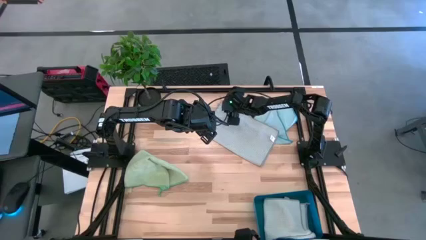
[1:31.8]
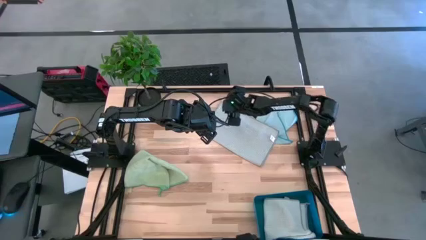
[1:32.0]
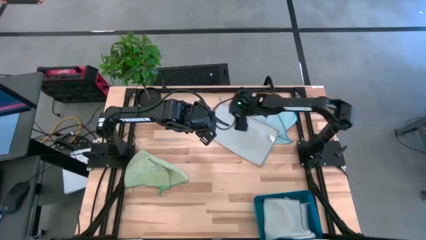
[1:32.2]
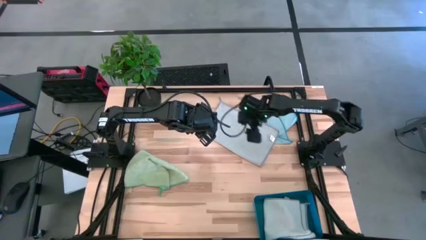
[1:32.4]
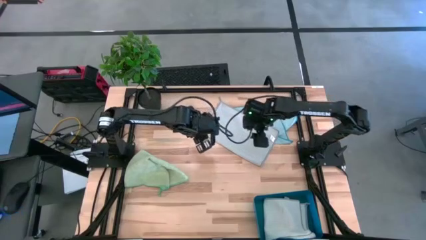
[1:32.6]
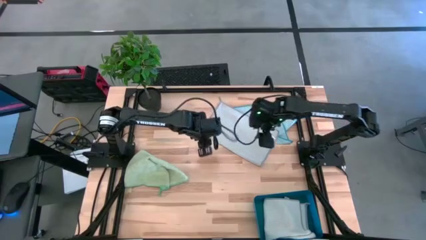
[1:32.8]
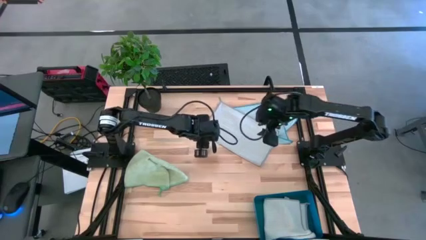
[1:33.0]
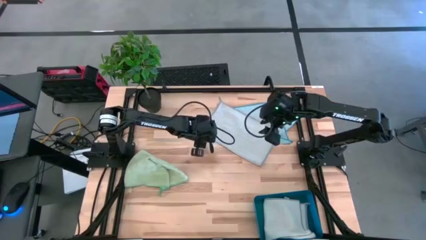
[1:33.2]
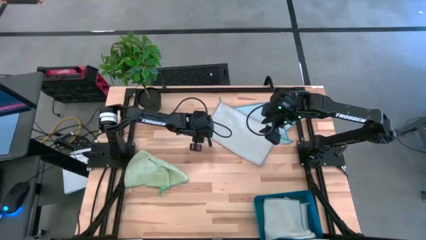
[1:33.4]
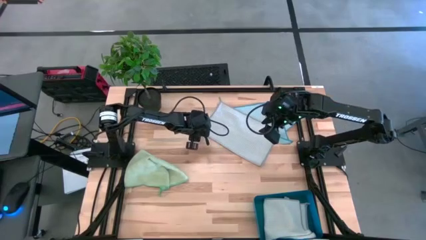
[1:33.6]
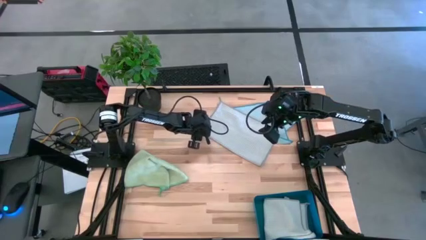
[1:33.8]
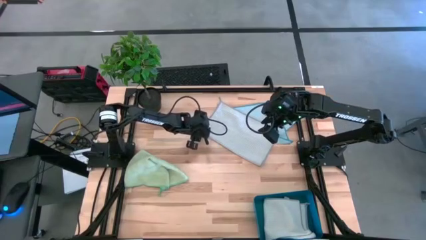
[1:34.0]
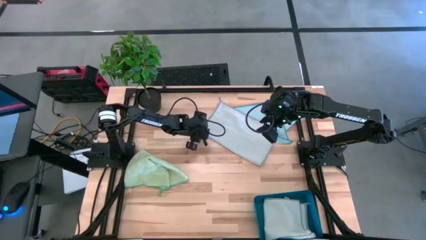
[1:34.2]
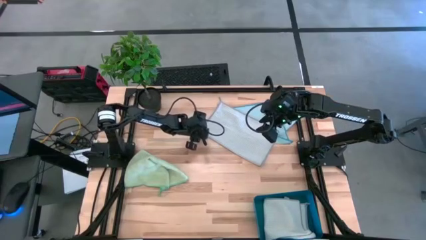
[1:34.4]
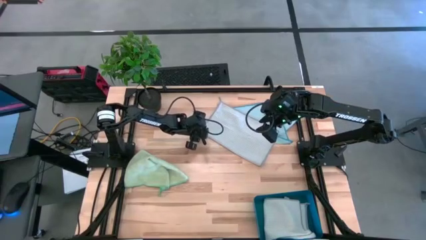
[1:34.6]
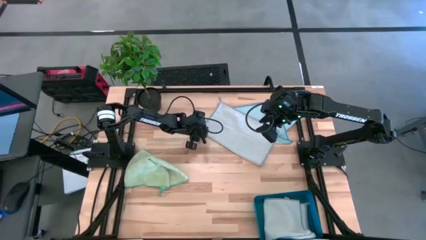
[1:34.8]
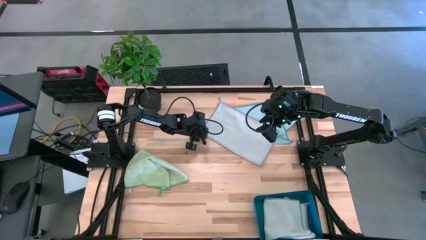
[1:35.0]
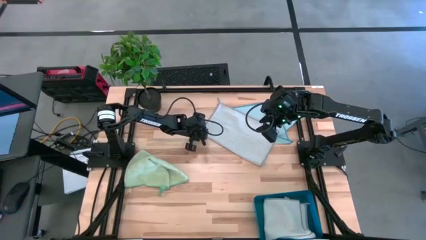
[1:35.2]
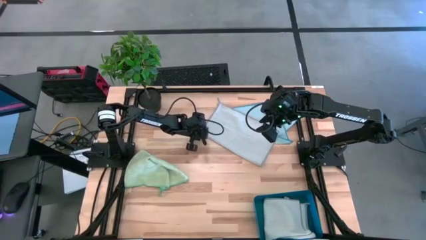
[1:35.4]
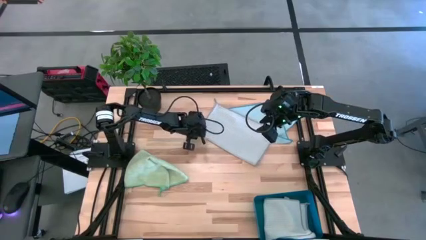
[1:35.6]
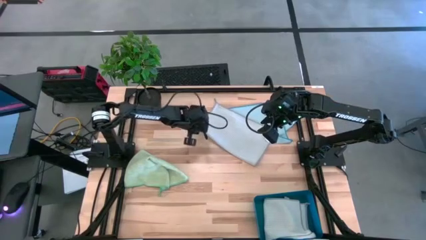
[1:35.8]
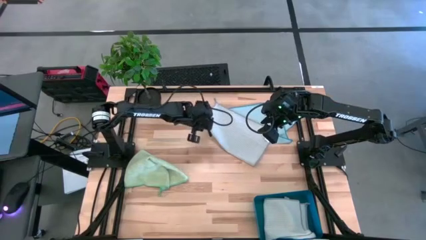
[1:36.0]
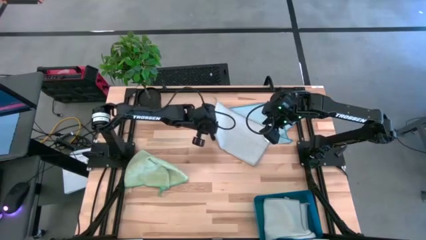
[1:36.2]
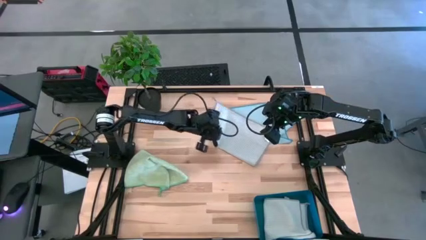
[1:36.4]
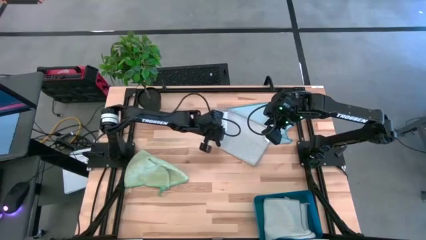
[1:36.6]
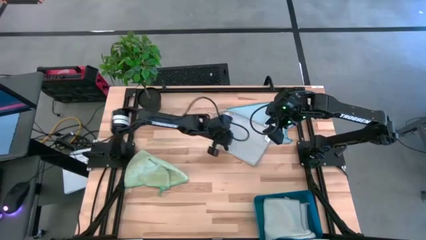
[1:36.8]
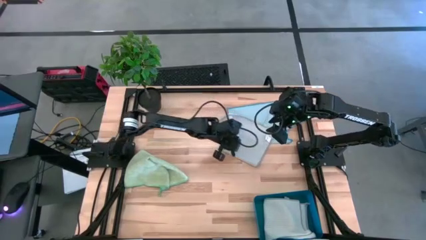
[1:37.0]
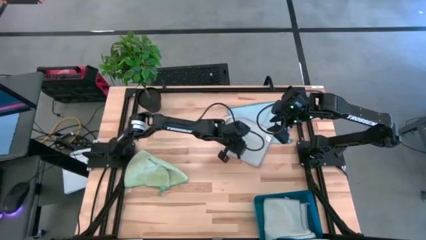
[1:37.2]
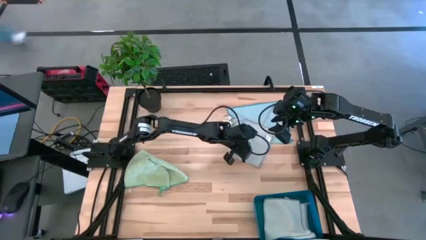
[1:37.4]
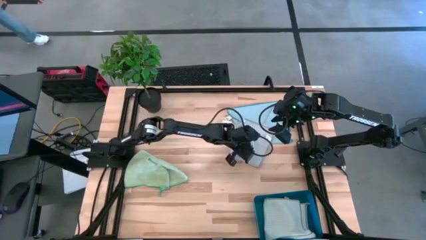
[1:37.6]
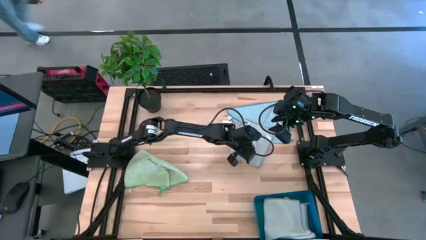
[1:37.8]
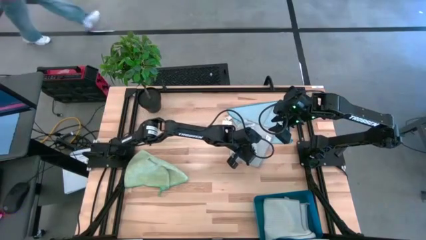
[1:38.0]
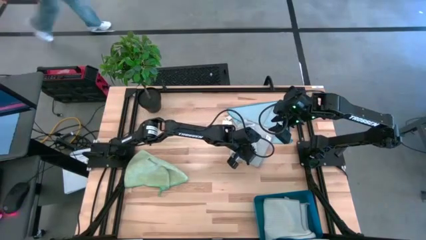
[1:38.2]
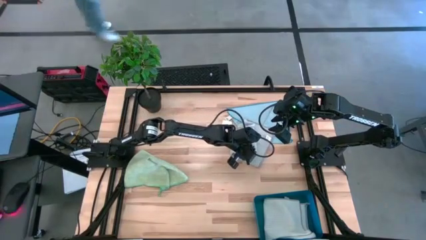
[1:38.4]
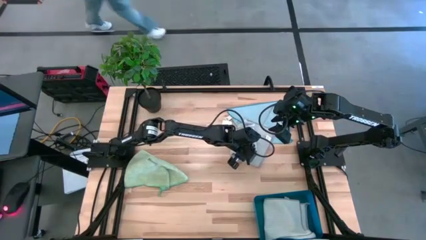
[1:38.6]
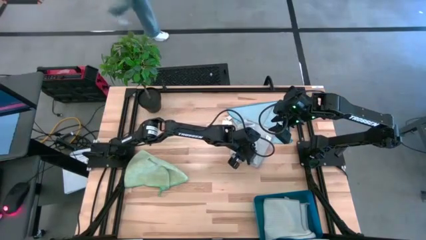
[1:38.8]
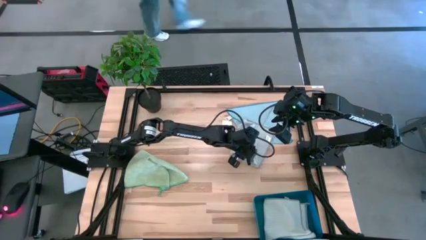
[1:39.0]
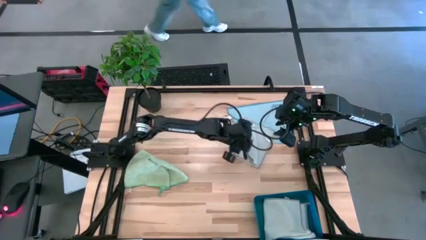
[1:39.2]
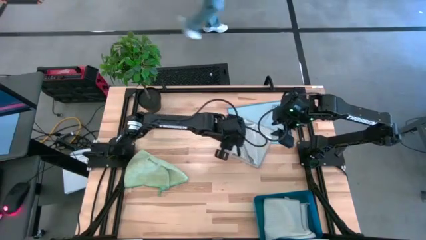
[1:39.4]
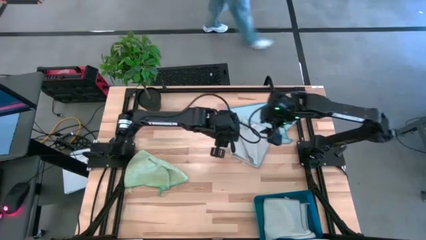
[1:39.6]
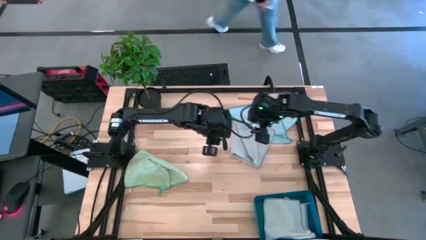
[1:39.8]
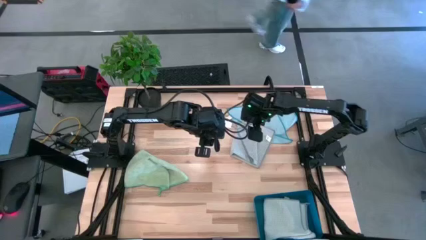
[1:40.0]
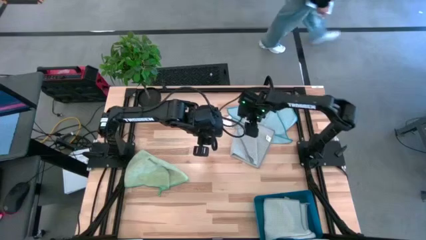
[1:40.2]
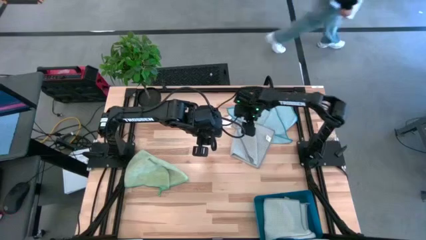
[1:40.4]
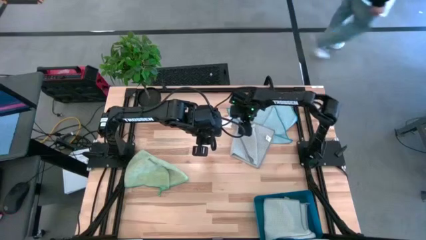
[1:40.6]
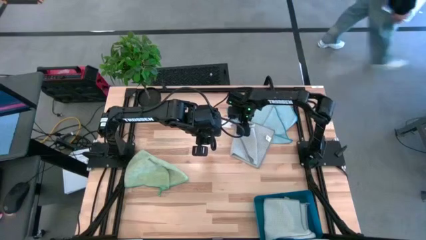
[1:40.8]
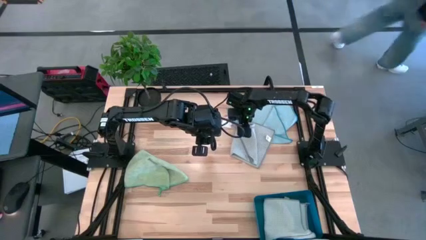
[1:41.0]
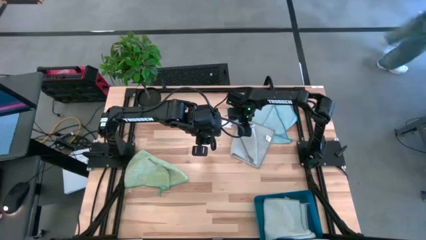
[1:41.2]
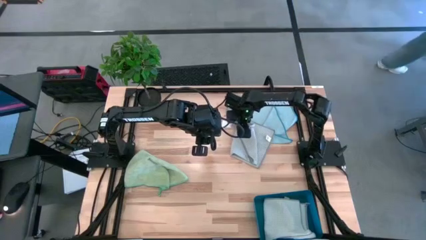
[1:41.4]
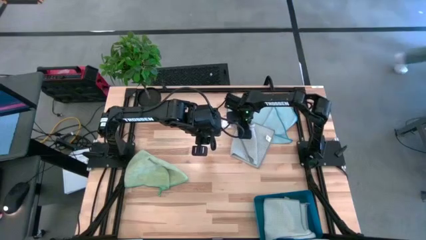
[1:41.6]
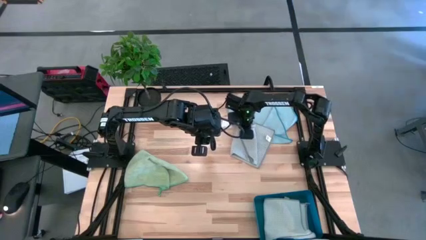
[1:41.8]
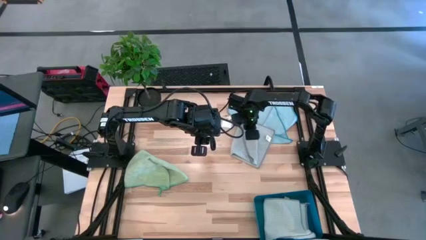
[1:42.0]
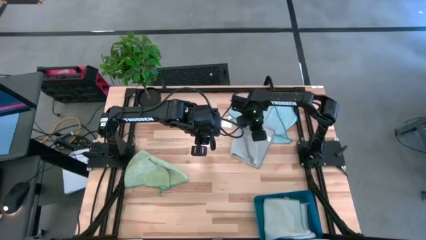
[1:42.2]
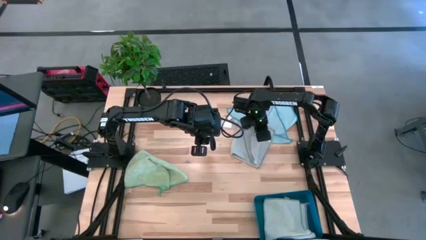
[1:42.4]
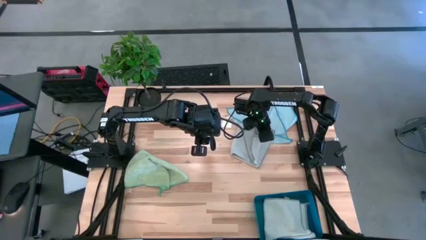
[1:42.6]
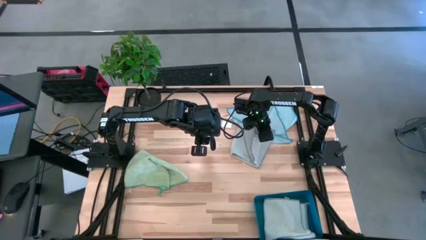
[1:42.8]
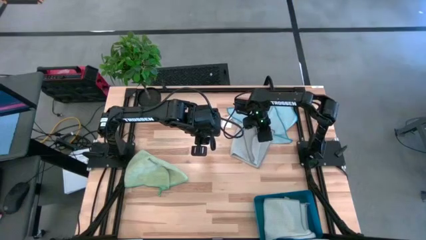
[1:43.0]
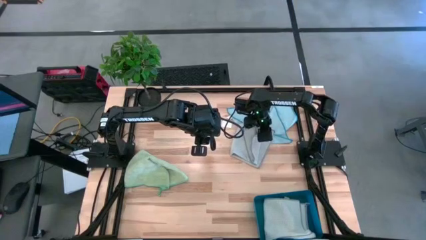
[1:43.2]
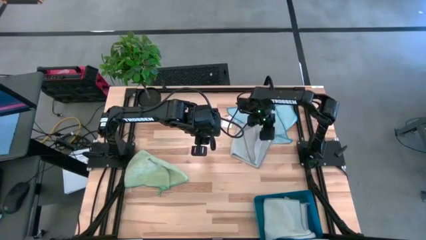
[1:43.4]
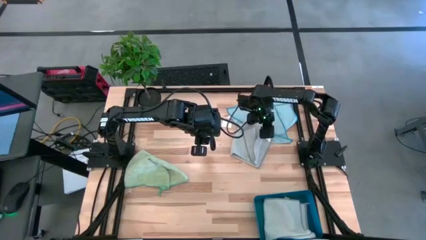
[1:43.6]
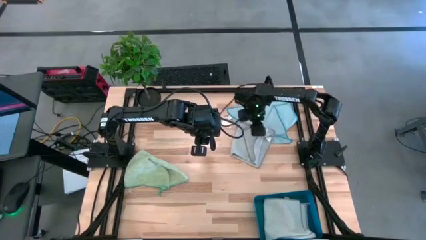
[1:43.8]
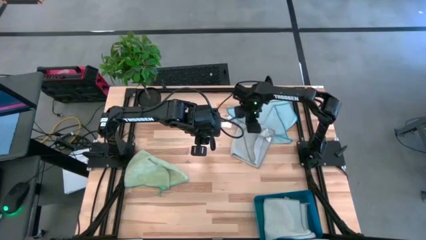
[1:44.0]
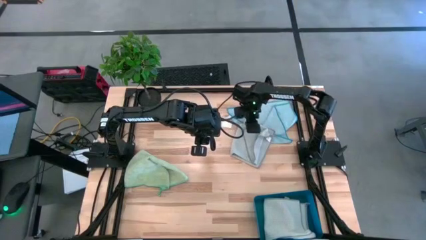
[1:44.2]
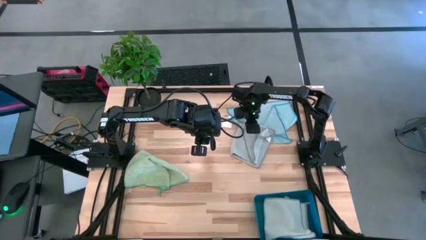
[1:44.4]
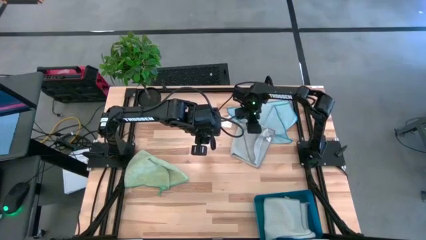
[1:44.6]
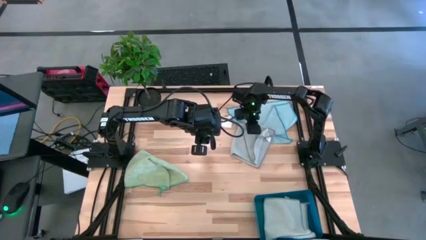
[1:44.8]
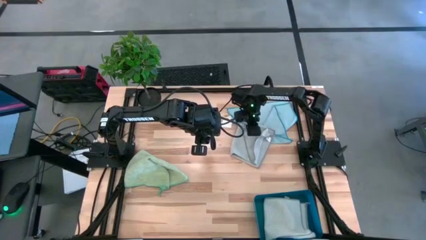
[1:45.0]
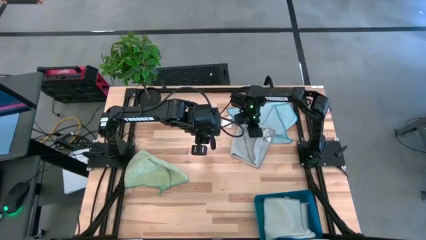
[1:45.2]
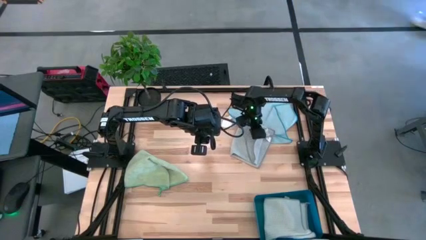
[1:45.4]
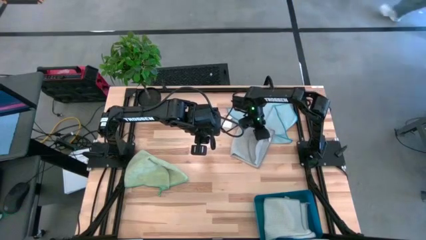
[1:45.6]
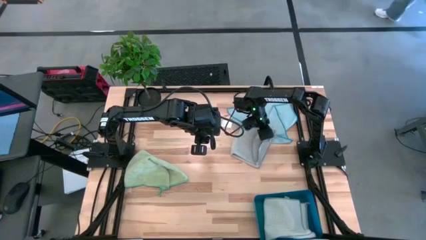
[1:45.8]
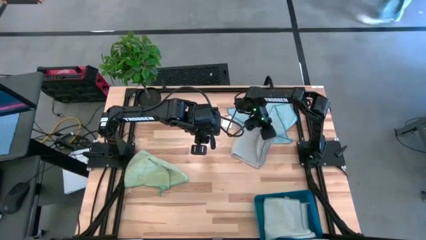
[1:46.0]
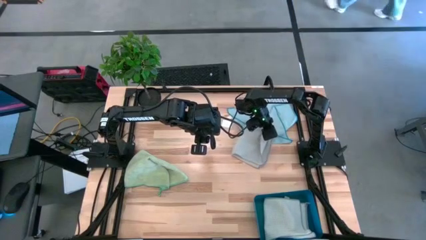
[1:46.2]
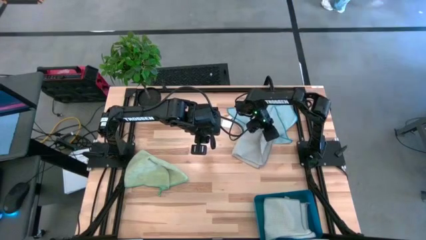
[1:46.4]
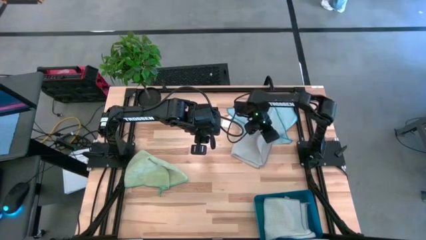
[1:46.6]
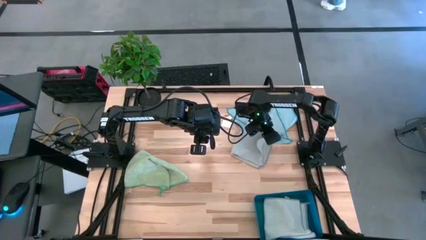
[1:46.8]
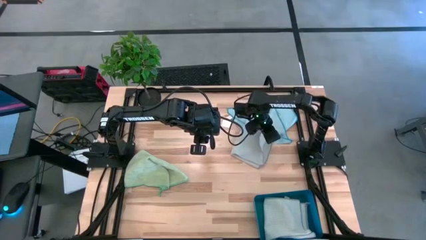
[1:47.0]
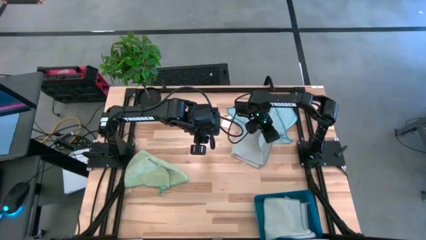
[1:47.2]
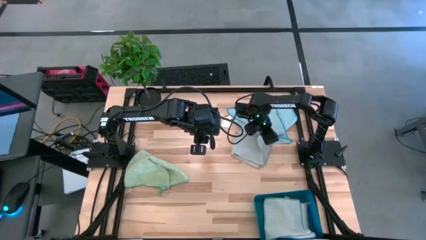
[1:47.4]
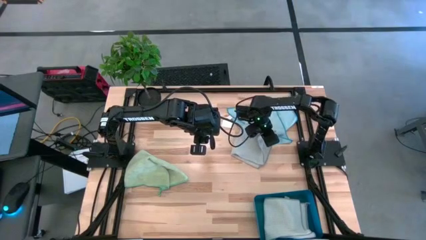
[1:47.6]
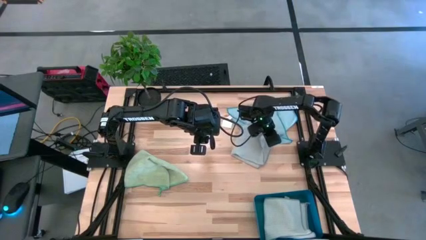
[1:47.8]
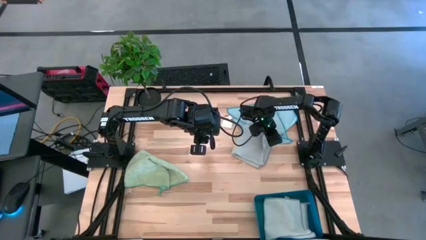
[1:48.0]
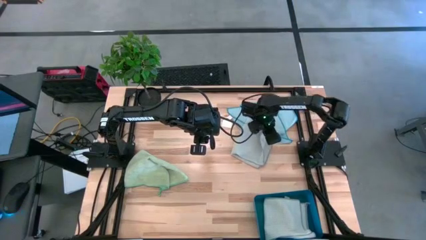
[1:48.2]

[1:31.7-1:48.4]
Task: Fold microfiber towels
Fold the gray microfiber cloth
